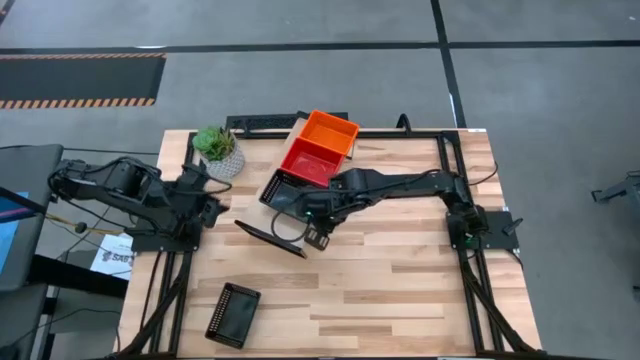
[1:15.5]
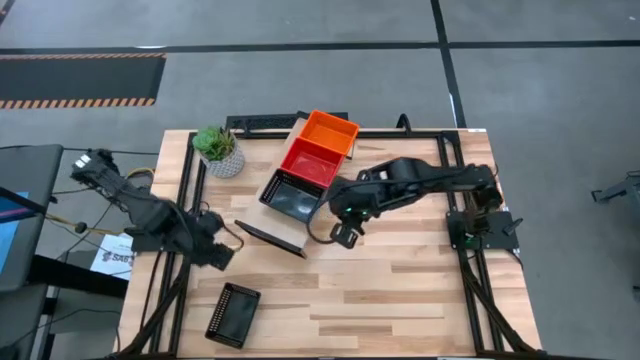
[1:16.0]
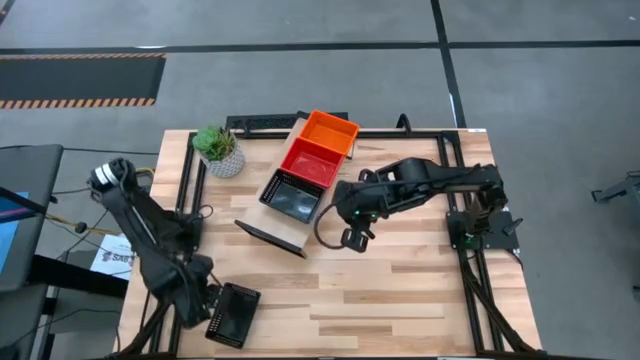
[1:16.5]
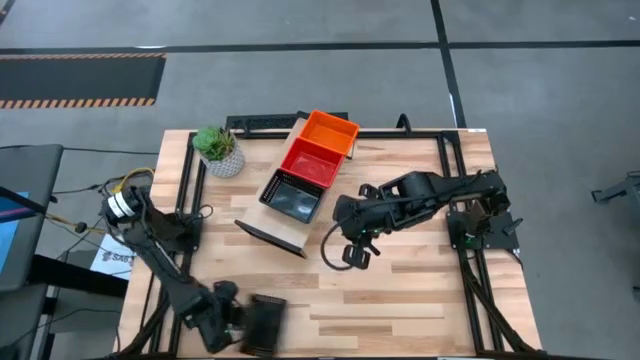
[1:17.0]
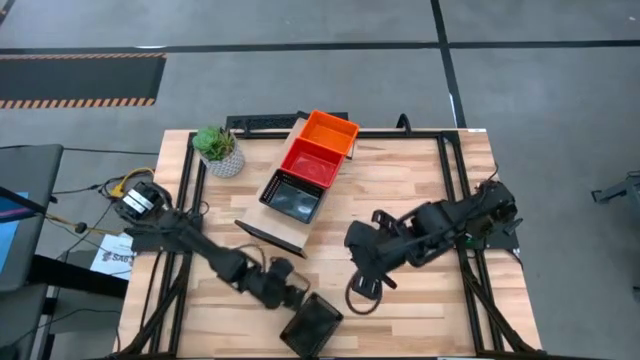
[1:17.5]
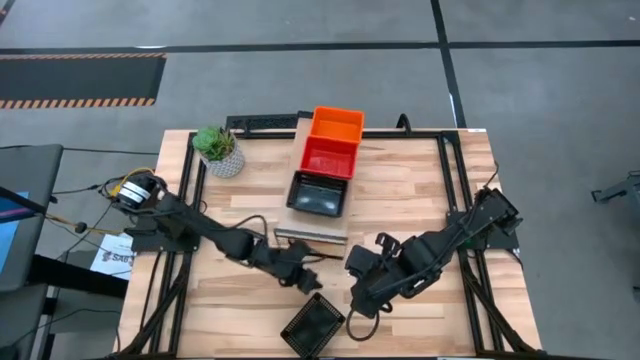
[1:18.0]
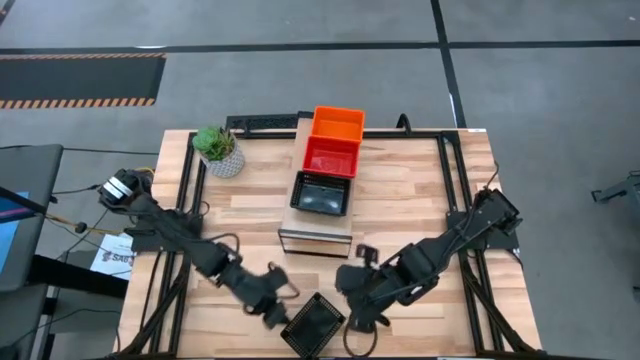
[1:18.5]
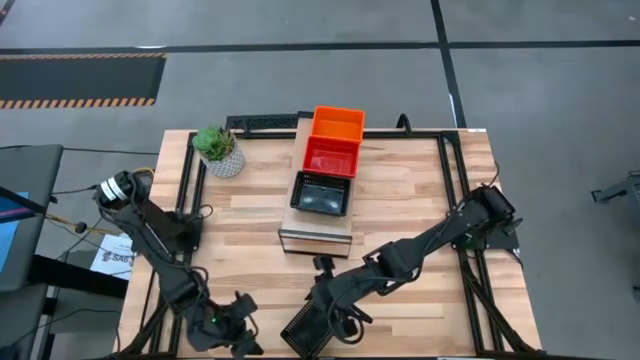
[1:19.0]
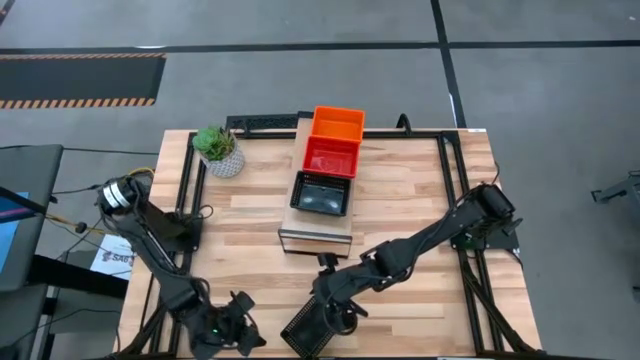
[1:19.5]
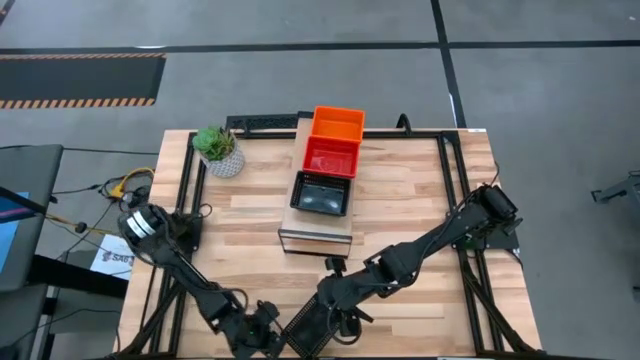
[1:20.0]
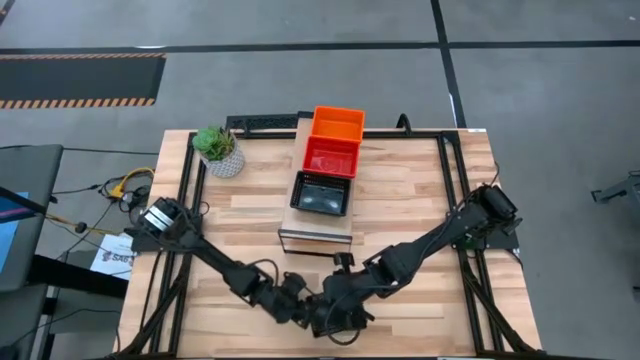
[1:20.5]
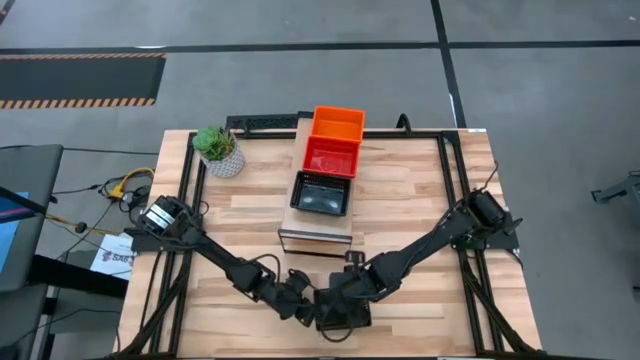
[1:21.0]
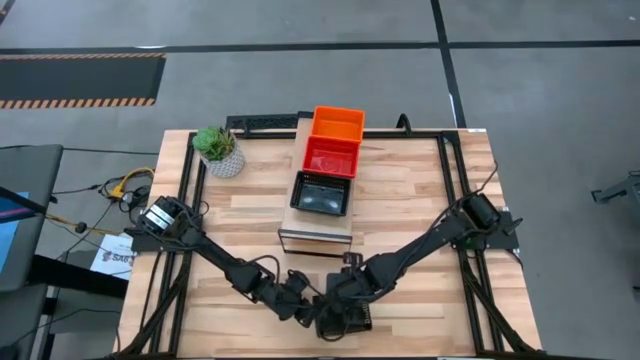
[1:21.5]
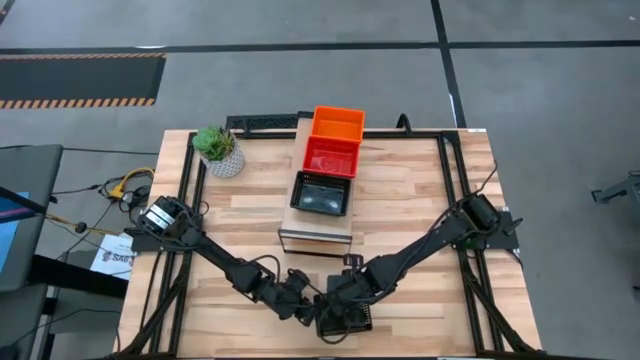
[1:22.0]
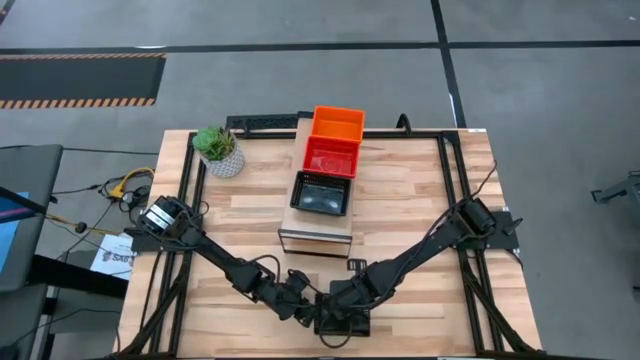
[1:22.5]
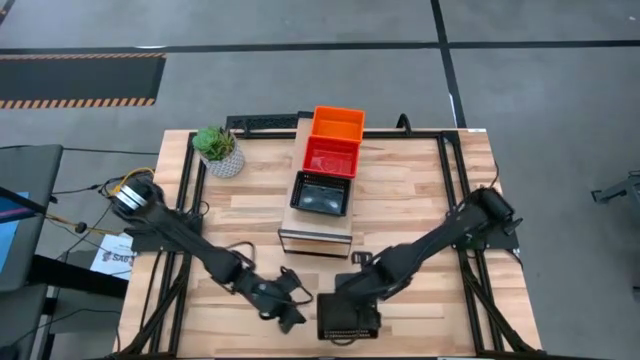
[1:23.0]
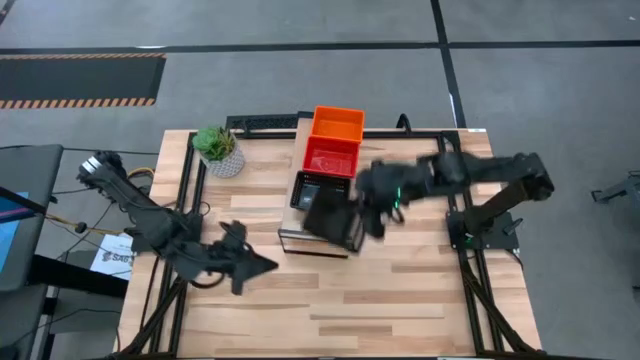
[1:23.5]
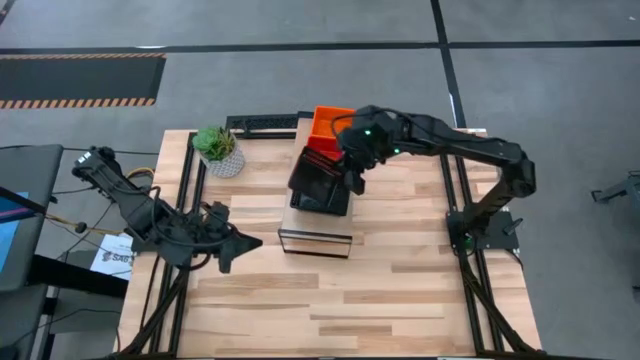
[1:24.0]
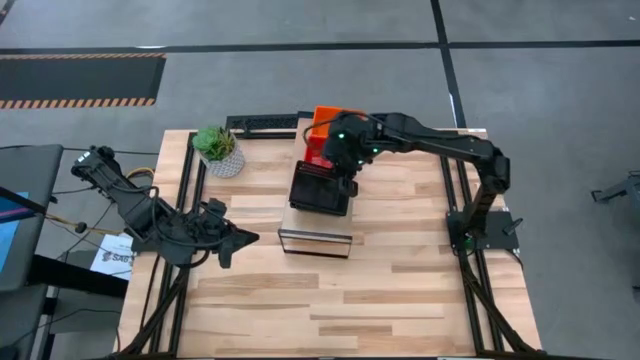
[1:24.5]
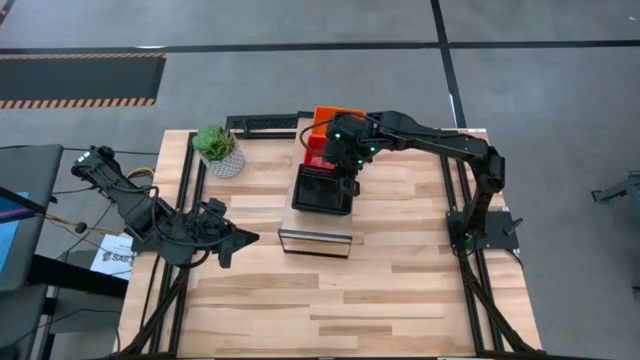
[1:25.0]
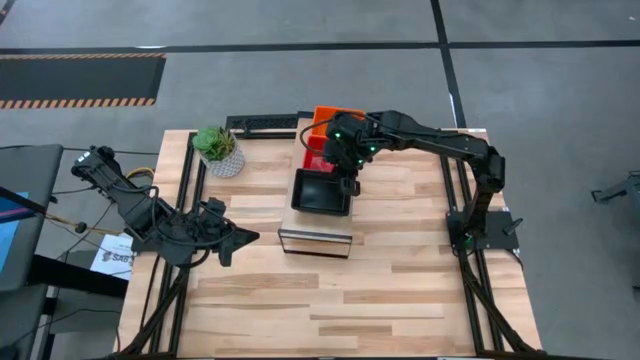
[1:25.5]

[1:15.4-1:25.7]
Task: Stack baskets on shelf by color
Stack the black bin on top of the stacked black bin on the shelf

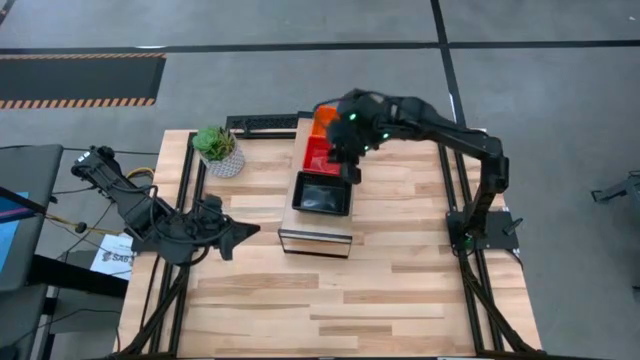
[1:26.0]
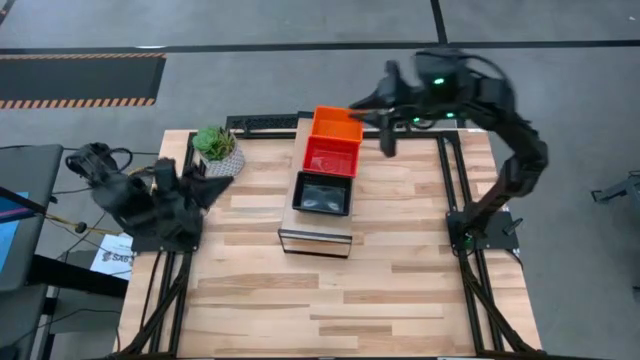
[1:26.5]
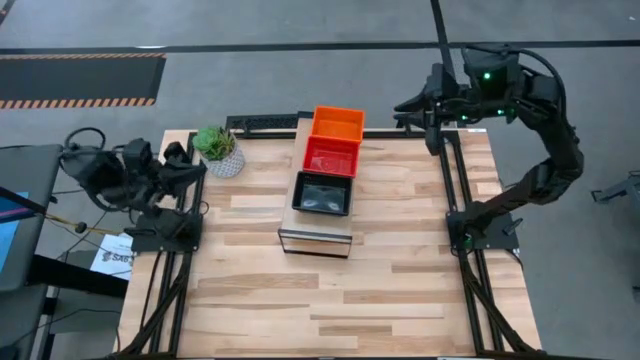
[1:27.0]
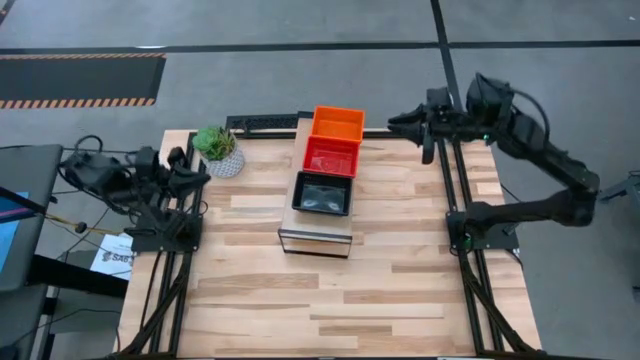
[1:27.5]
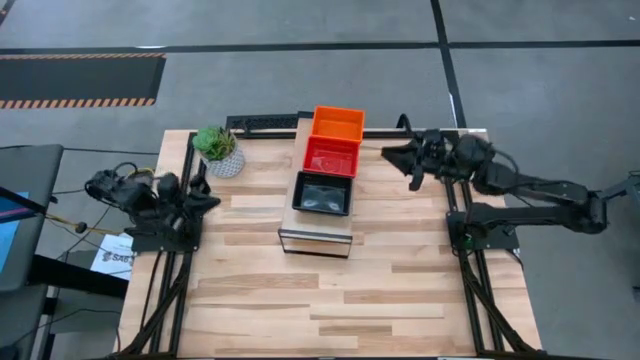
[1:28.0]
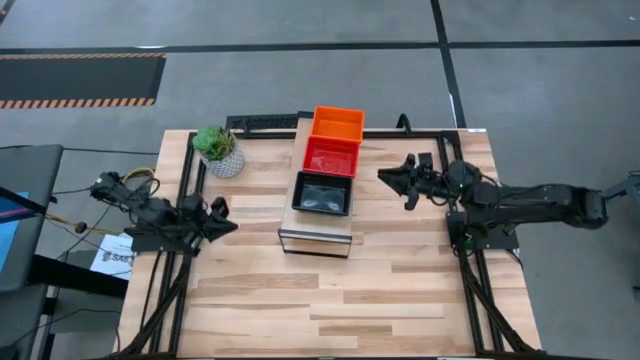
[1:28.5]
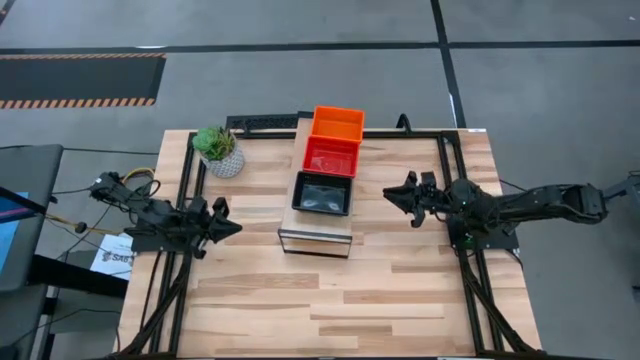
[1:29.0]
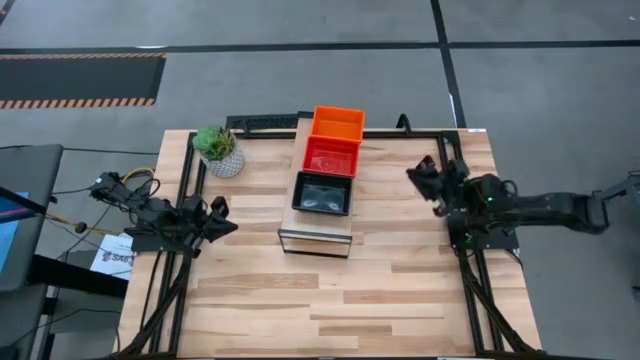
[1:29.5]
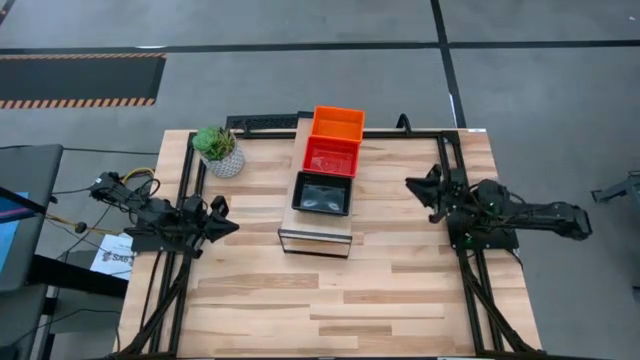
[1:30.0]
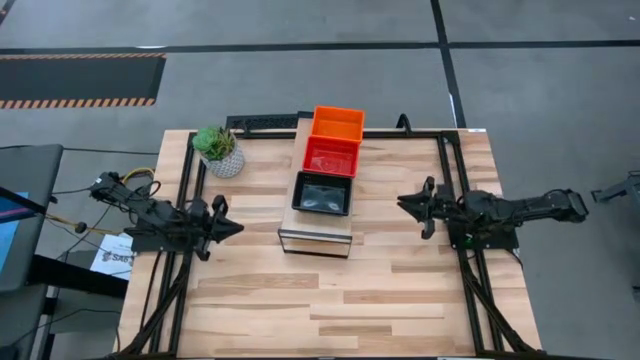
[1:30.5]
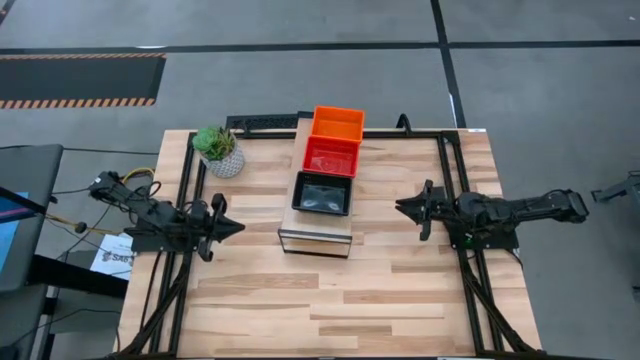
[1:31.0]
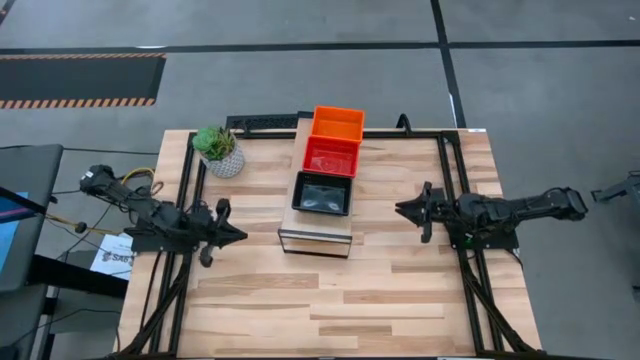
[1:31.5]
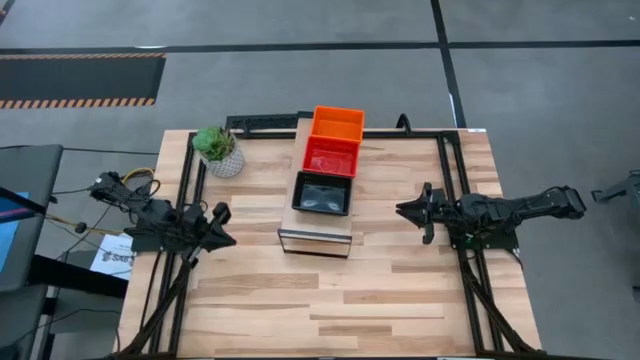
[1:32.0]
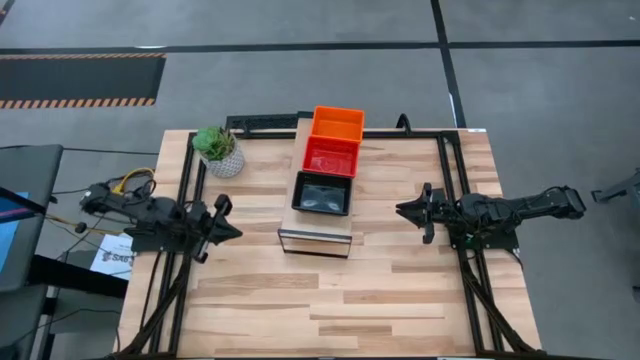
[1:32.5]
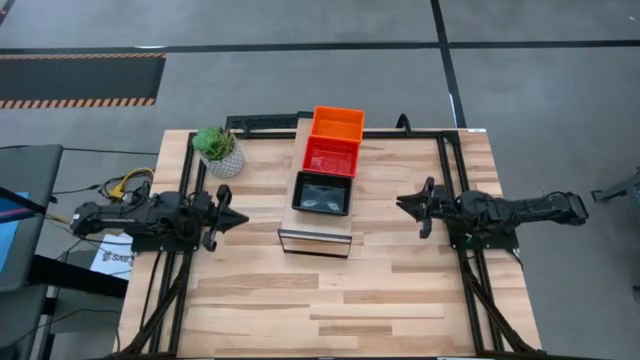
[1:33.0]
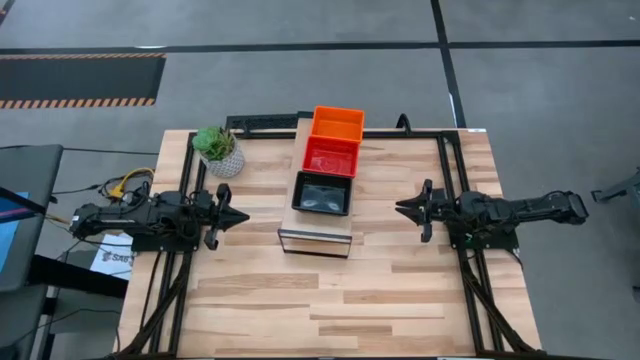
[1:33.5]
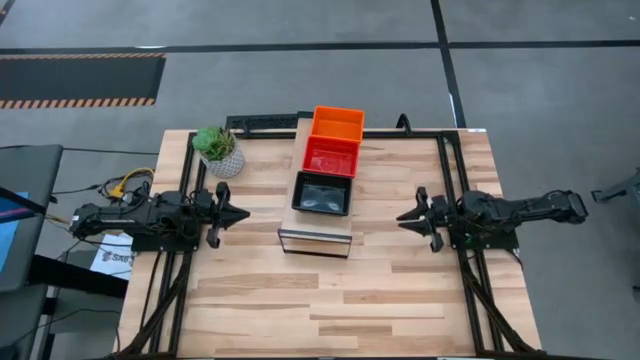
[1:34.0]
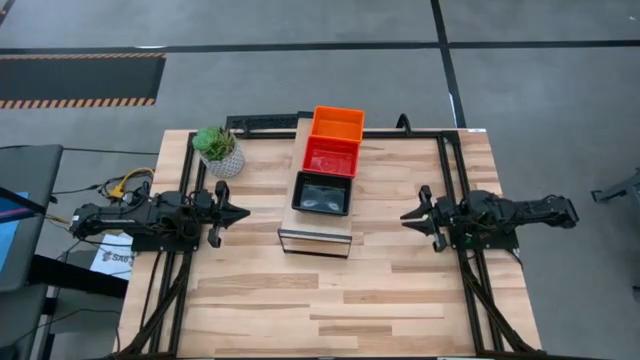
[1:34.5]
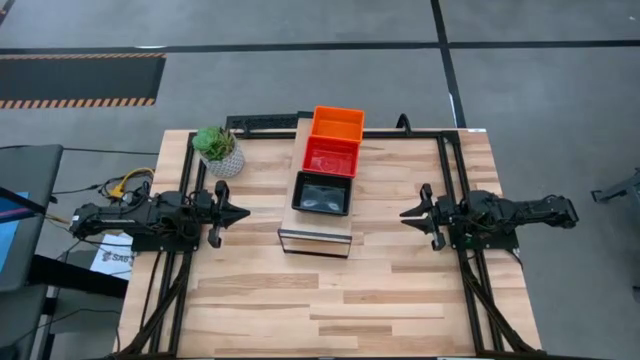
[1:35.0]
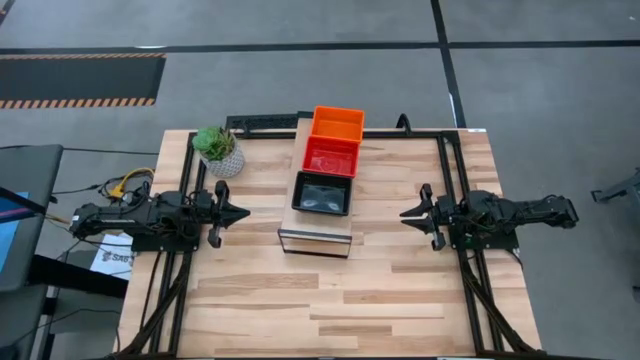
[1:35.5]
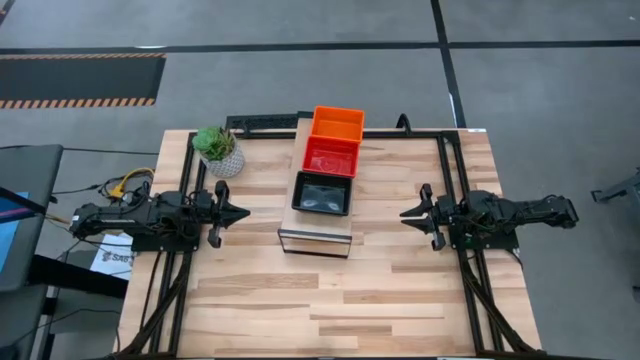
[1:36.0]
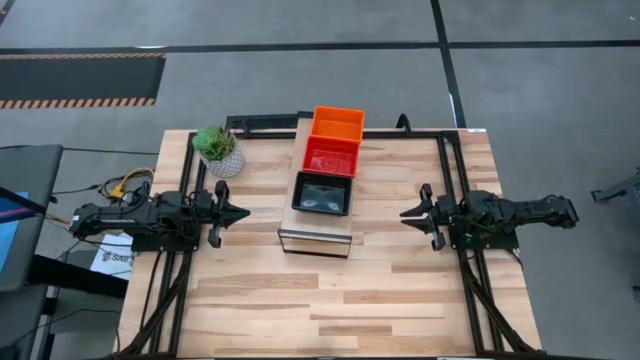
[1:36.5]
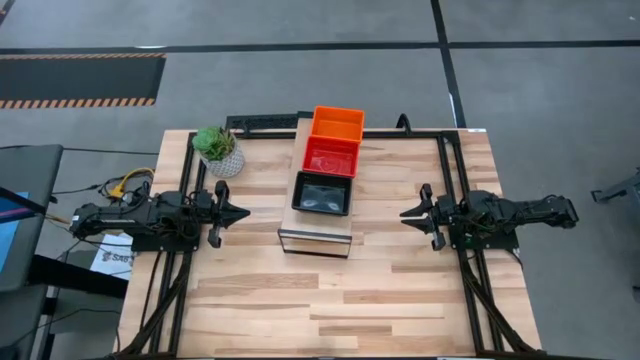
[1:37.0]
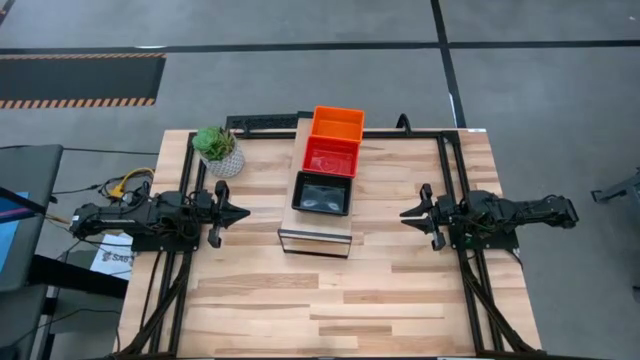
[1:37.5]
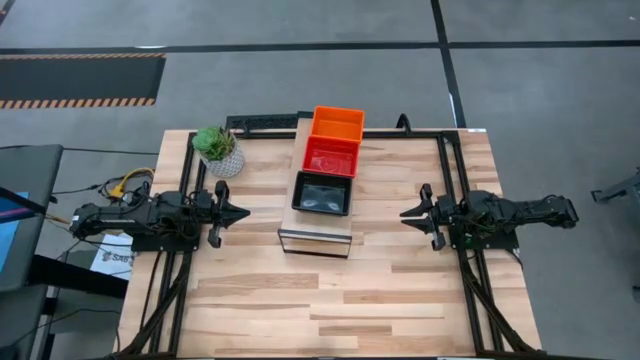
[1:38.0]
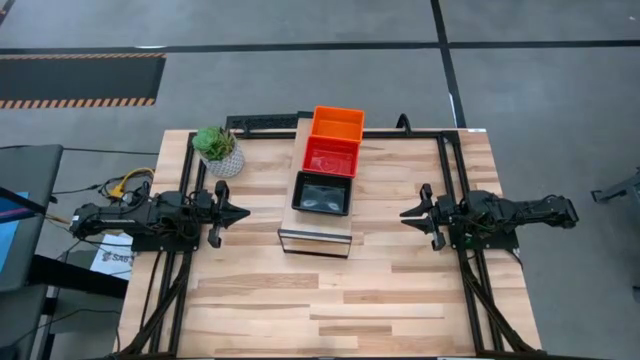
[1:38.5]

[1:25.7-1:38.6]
Return to Home Position
